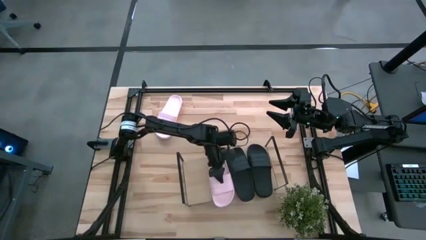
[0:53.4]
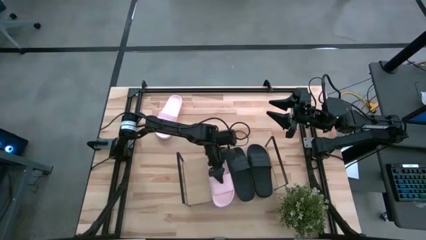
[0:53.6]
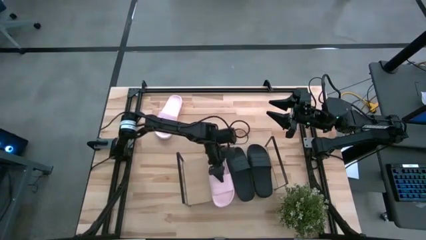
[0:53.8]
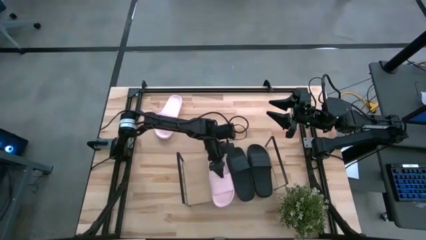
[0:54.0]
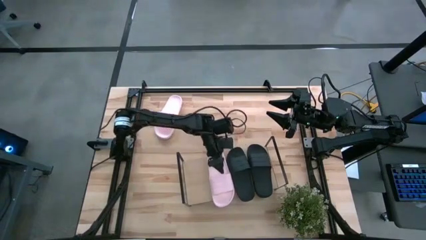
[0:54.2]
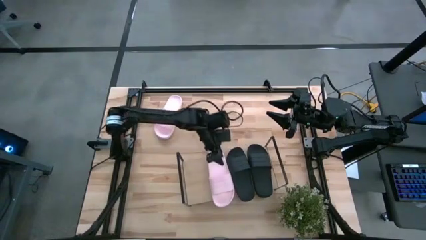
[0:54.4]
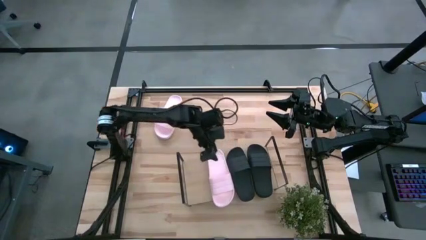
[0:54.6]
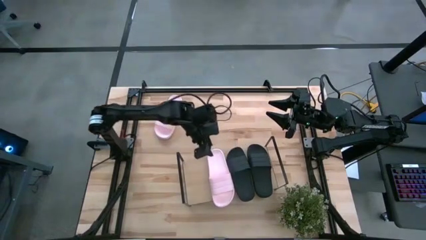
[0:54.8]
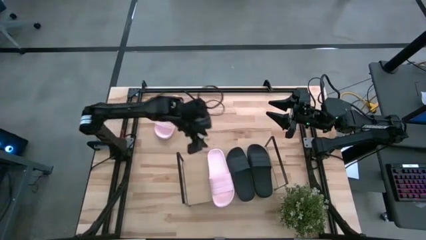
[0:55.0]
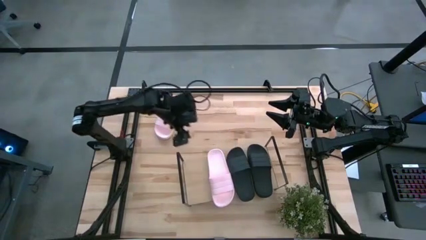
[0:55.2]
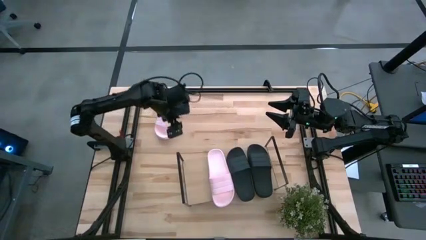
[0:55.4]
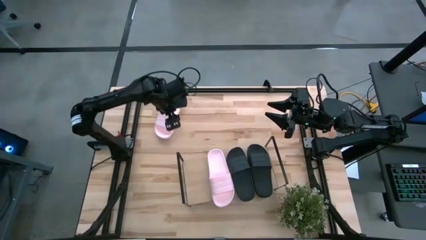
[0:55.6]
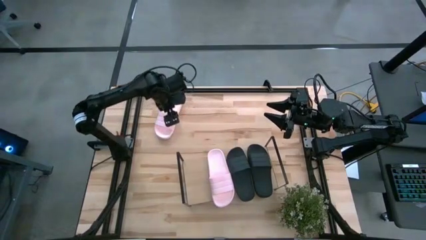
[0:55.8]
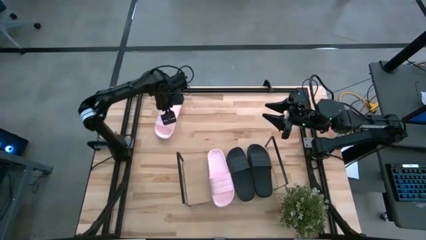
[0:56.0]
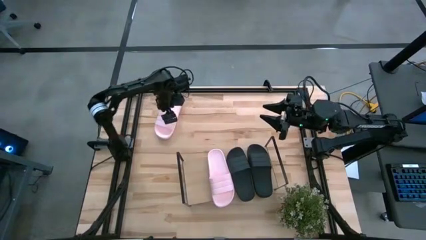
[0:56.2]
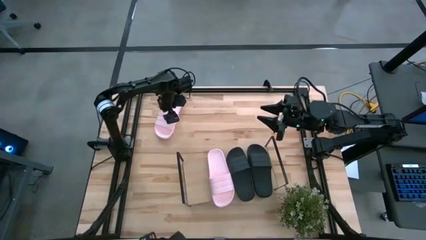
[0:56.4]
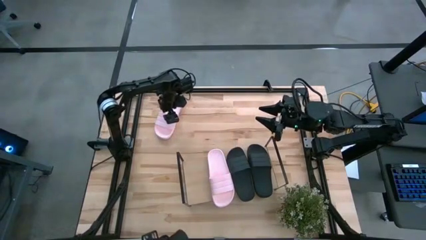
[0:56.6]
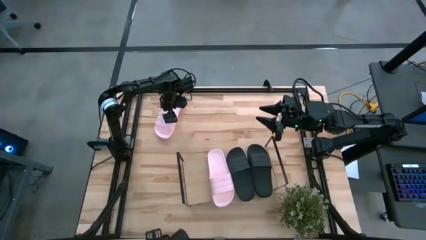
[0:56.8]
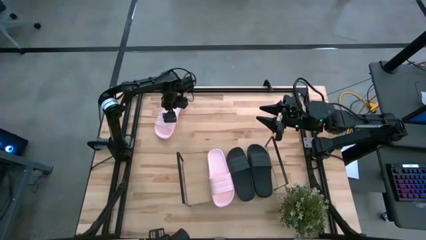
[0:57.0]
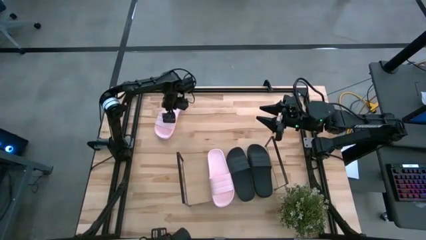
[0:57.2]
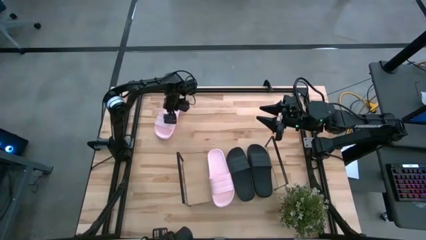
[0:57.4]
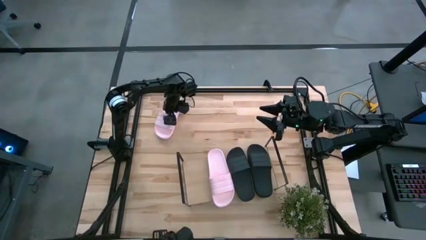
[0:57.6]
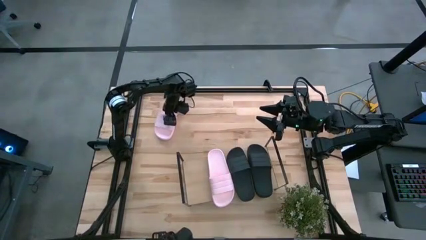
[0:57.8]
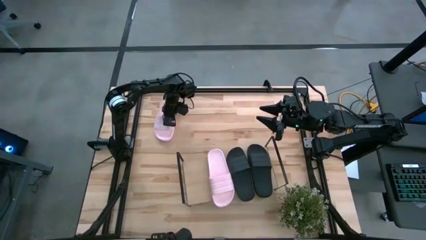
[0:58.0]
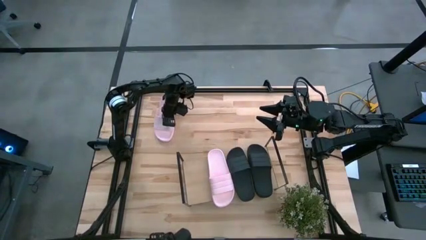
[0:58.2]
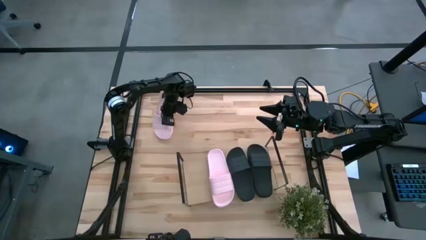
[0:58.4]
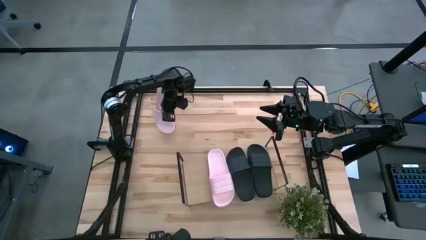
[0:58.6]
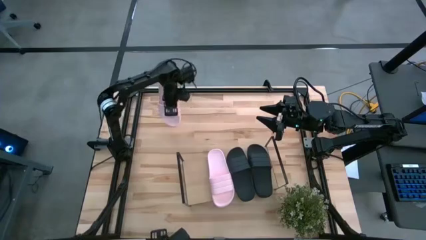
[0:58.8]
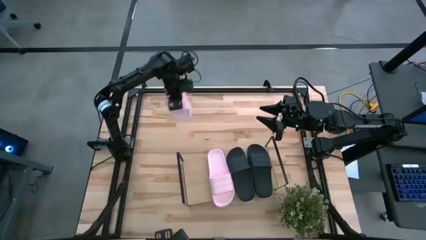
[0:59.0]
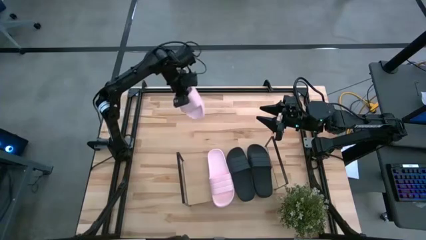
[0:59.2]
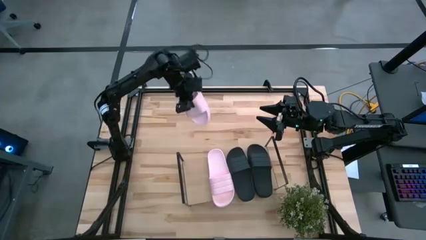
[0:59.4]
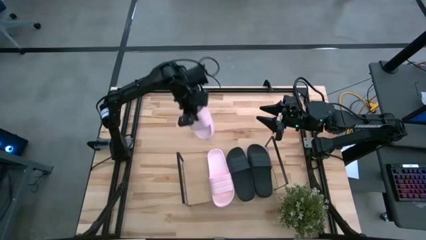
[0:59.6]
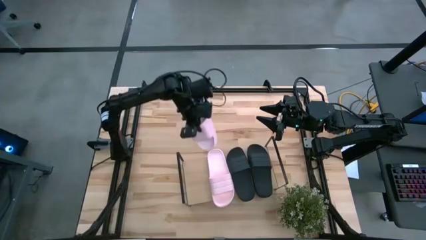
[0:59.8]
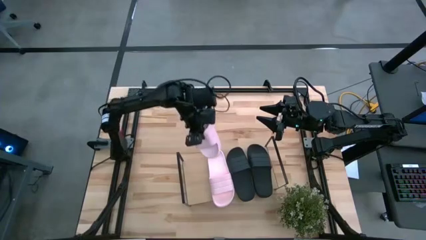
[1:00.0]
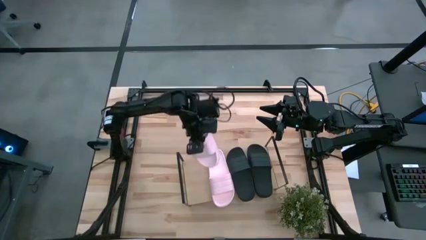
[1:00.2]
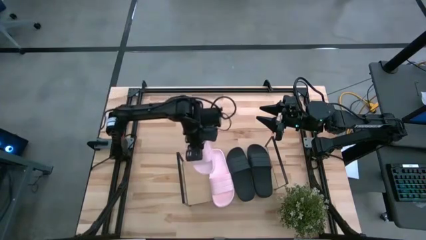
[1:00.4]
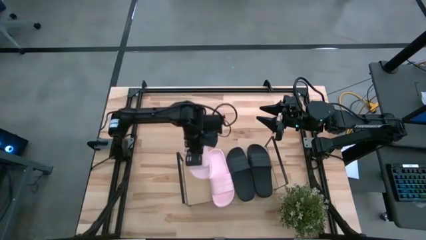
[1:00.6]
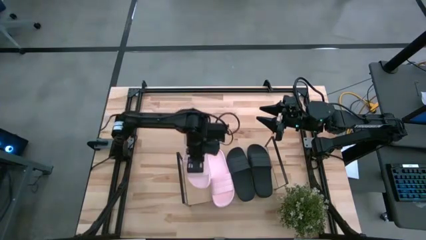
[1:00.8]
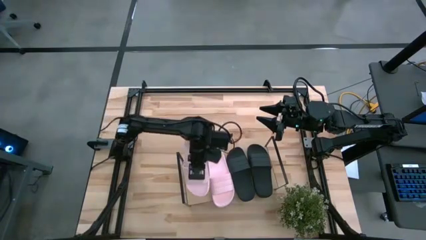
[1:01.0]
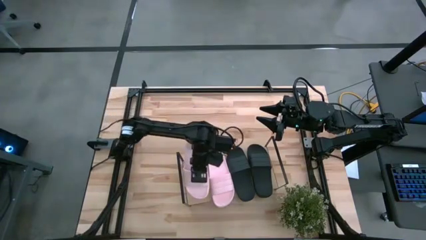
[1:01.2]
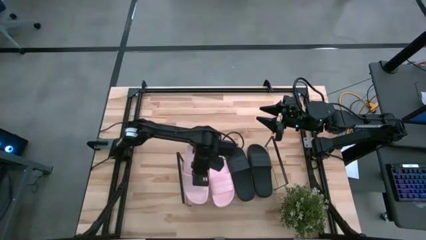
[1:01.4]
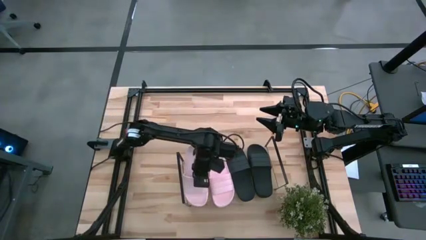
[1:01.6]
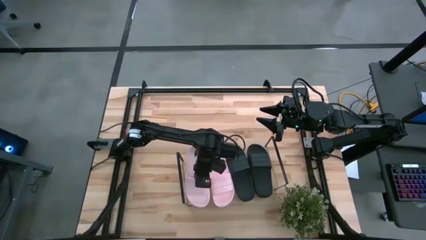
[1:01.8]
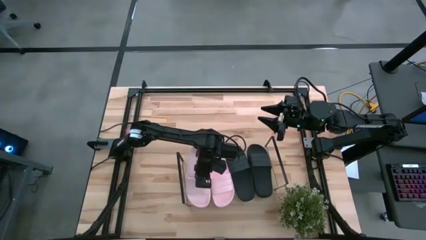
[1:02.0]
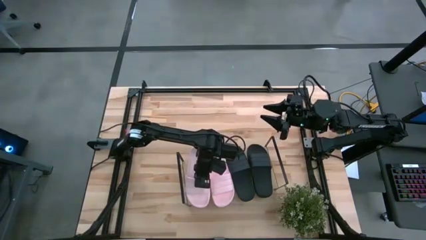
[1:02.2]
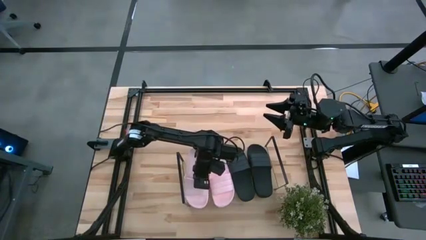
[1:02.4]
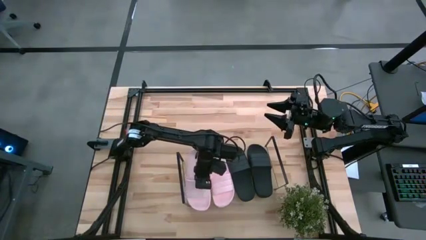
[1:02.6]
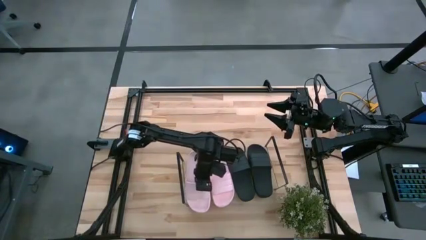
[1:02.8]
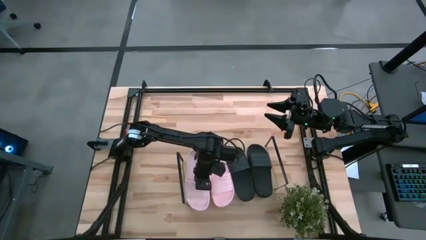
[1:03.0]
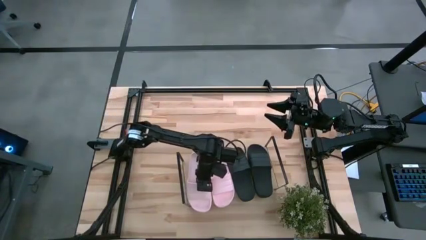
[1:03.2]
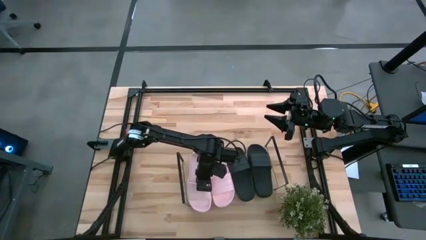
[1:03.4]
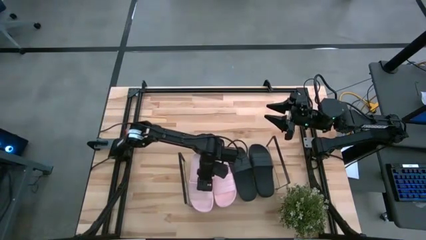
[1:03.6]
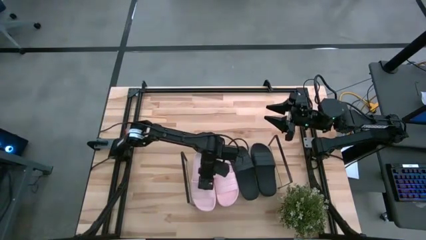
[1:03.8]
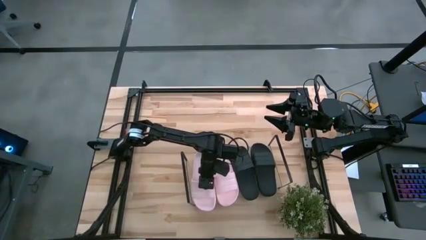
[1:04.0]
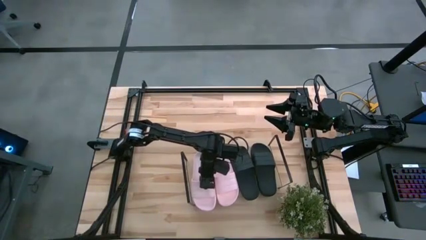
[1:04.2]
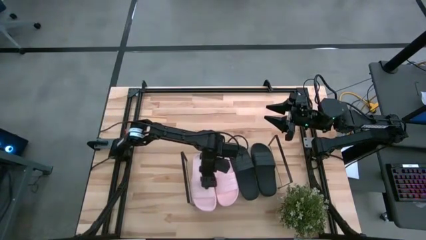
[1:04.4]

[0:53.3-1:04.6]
Task: Pick and place slides into the shelf
Put the pink slide on the shelf
